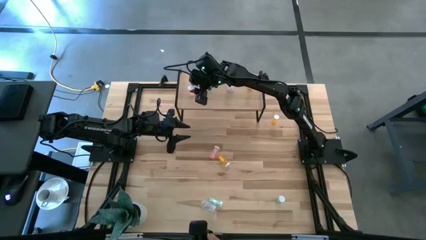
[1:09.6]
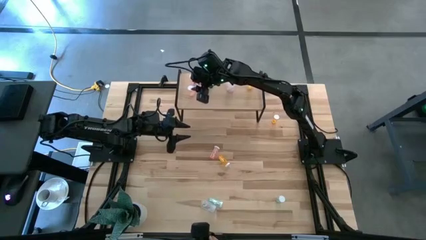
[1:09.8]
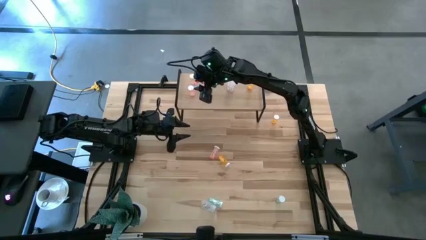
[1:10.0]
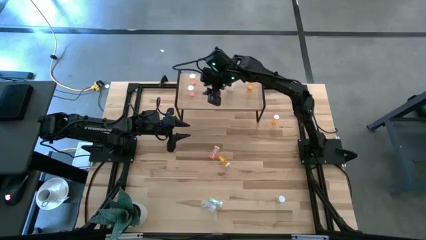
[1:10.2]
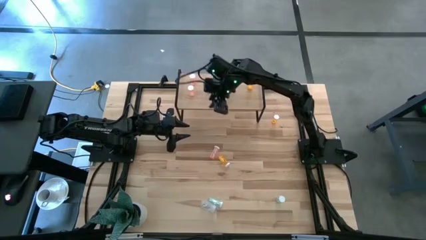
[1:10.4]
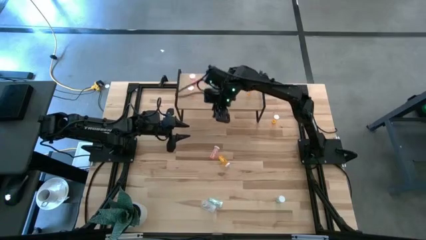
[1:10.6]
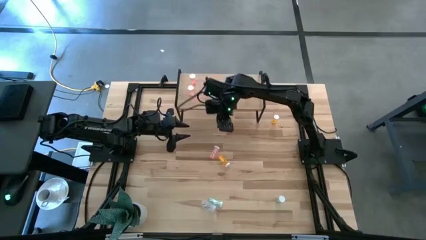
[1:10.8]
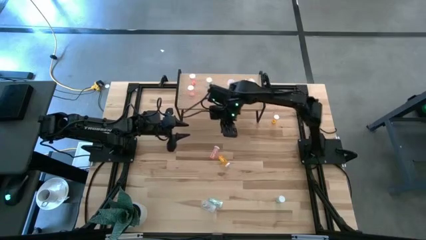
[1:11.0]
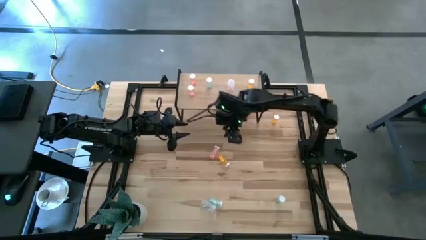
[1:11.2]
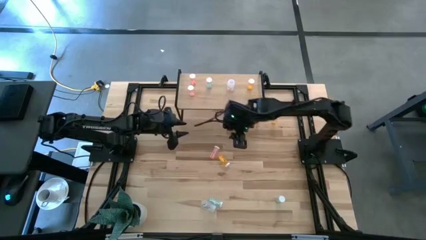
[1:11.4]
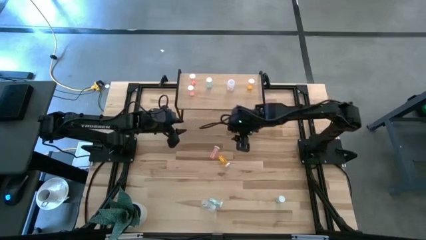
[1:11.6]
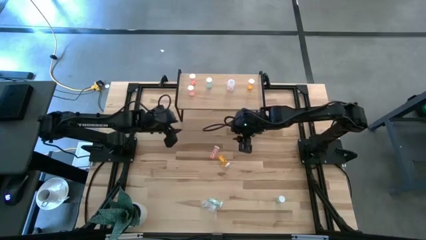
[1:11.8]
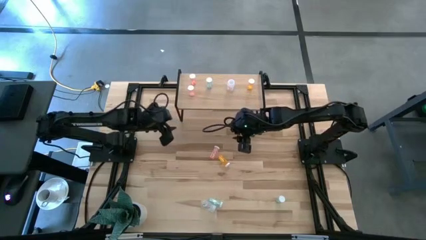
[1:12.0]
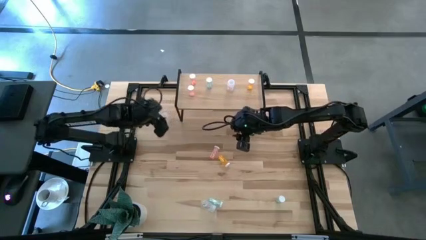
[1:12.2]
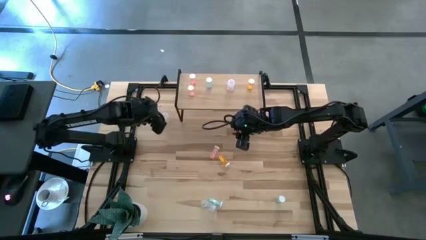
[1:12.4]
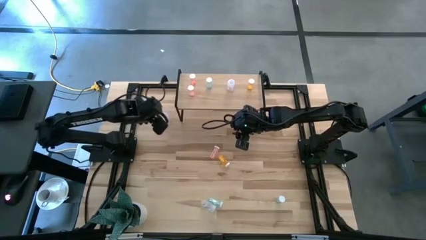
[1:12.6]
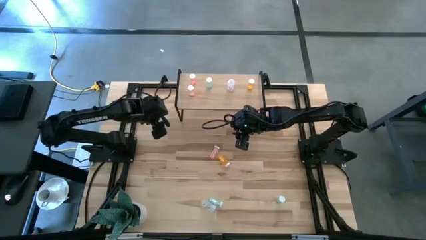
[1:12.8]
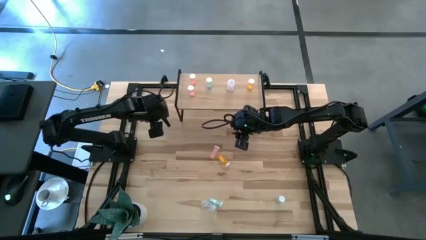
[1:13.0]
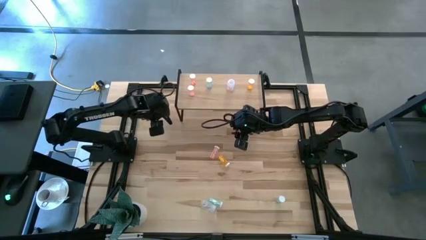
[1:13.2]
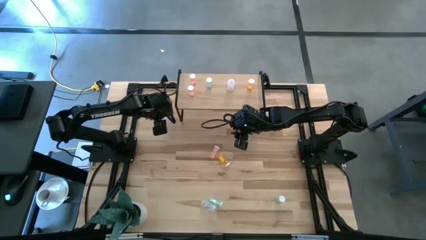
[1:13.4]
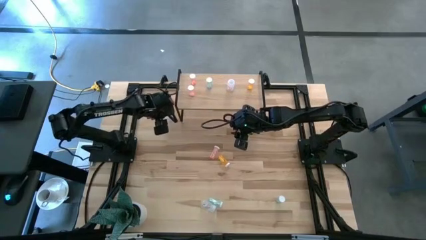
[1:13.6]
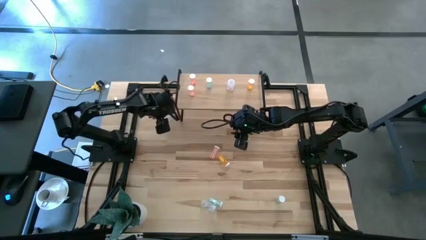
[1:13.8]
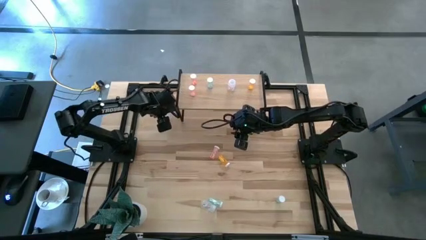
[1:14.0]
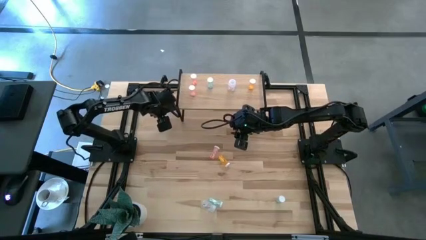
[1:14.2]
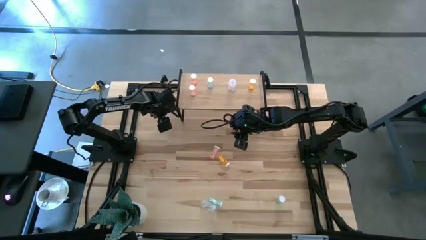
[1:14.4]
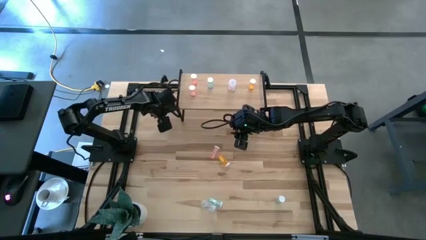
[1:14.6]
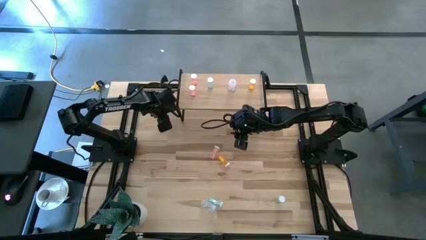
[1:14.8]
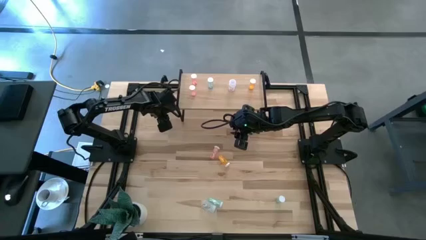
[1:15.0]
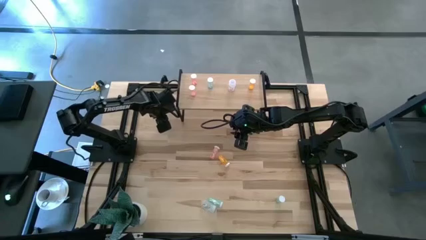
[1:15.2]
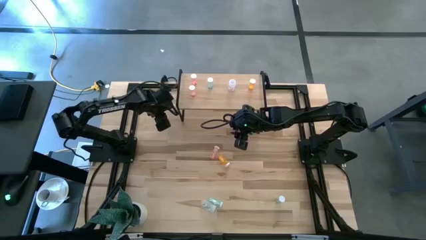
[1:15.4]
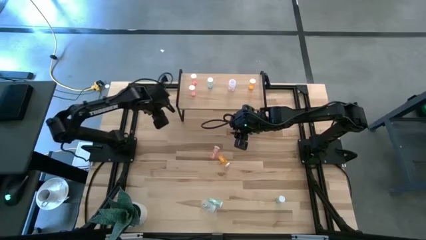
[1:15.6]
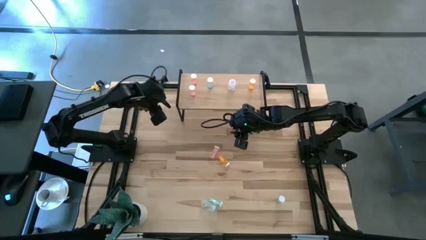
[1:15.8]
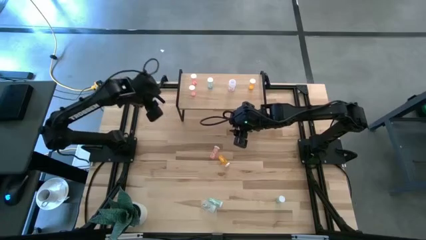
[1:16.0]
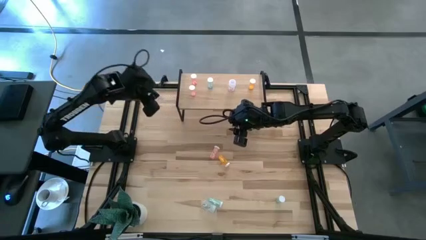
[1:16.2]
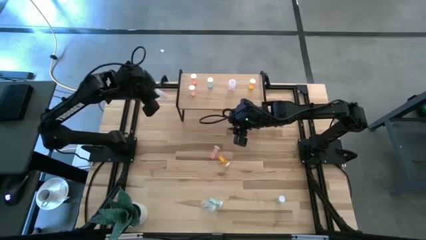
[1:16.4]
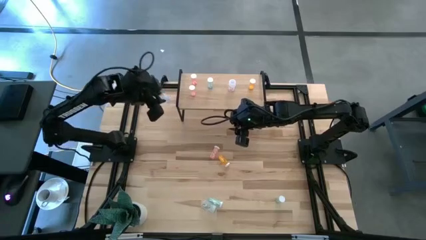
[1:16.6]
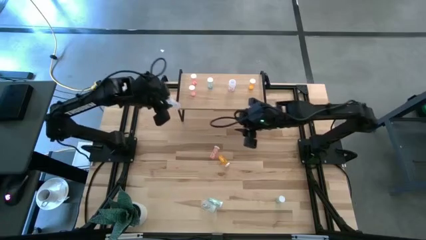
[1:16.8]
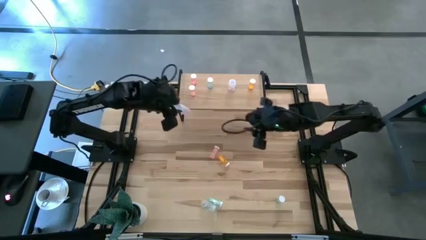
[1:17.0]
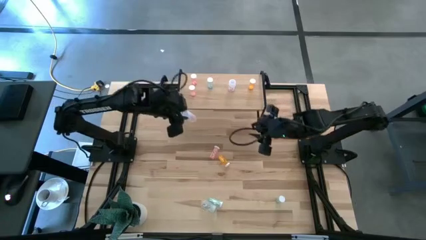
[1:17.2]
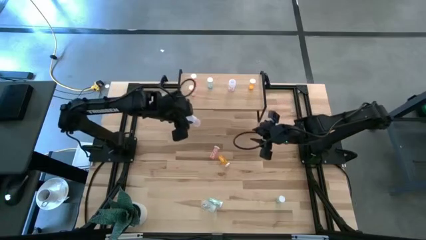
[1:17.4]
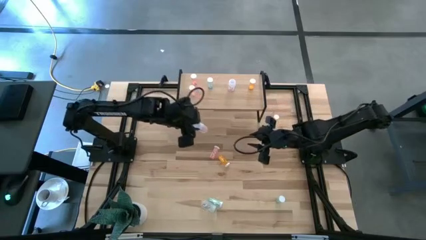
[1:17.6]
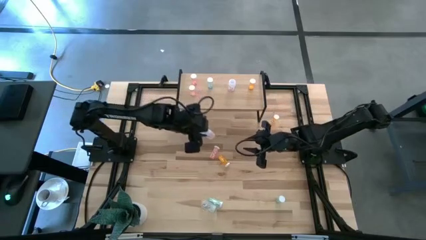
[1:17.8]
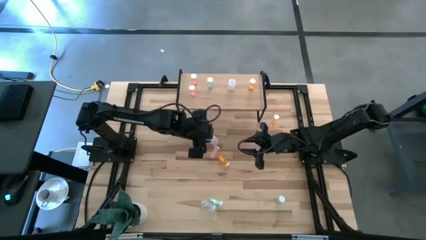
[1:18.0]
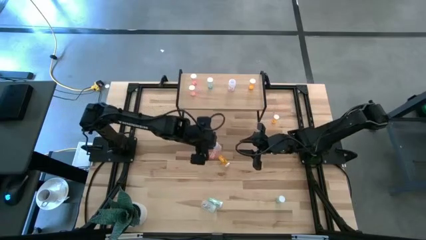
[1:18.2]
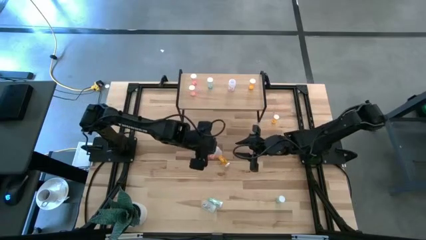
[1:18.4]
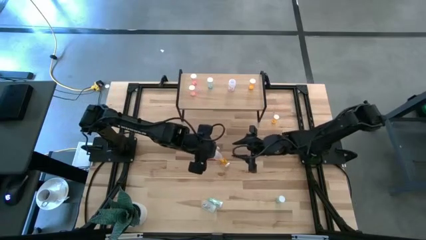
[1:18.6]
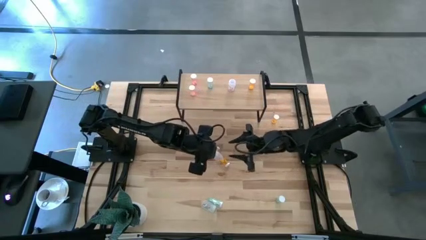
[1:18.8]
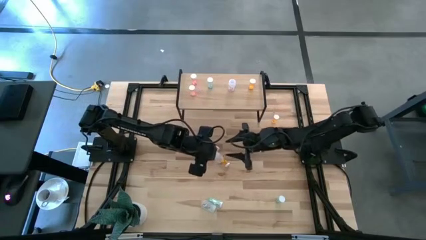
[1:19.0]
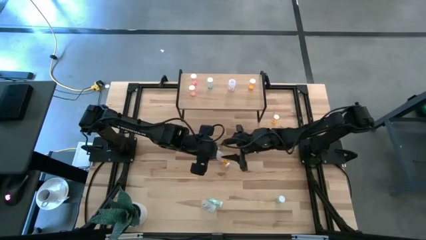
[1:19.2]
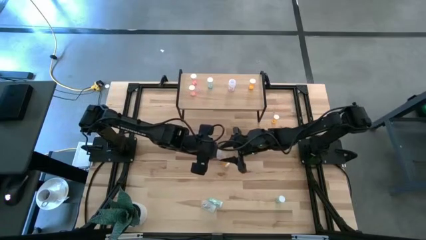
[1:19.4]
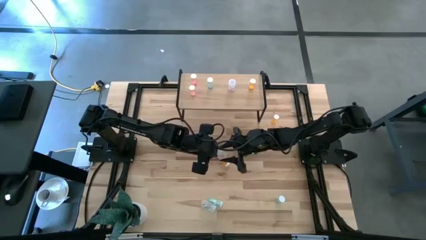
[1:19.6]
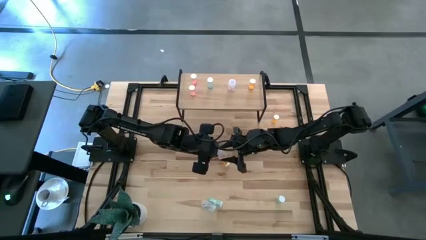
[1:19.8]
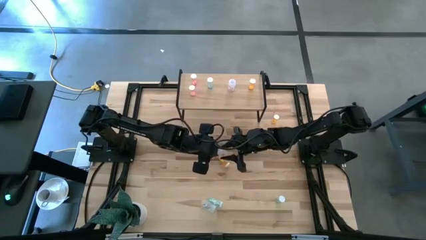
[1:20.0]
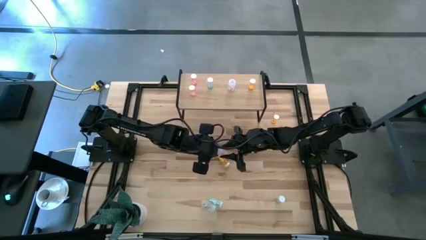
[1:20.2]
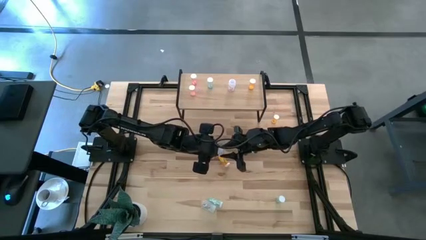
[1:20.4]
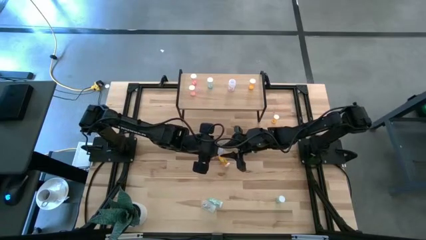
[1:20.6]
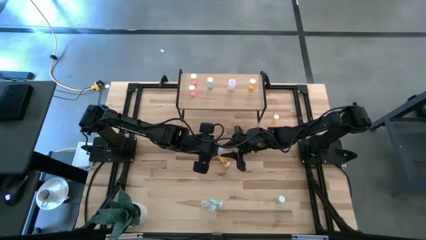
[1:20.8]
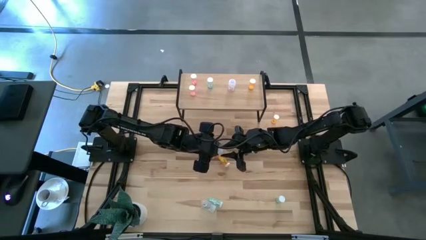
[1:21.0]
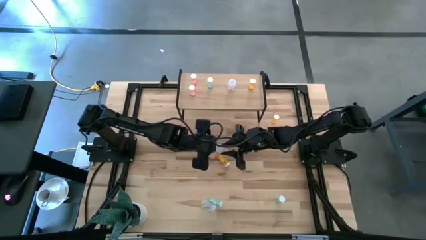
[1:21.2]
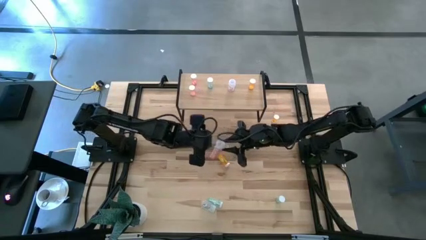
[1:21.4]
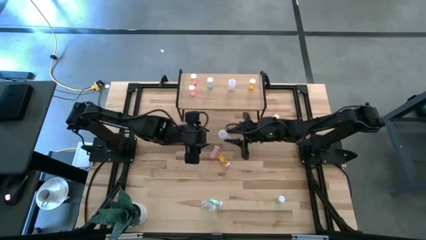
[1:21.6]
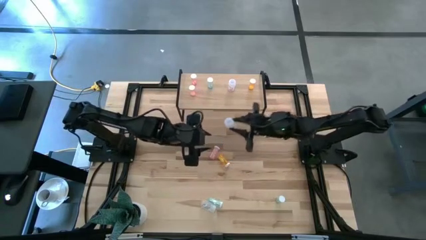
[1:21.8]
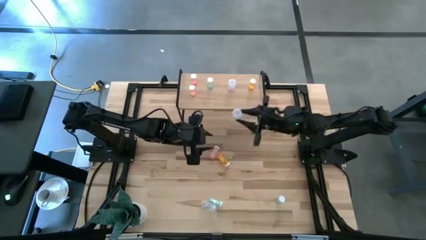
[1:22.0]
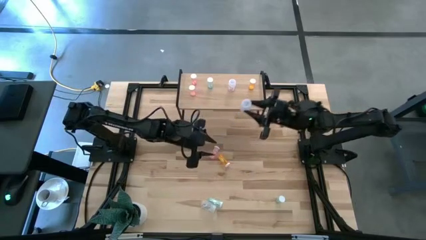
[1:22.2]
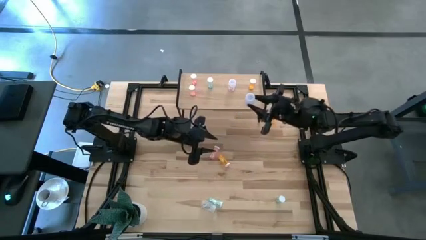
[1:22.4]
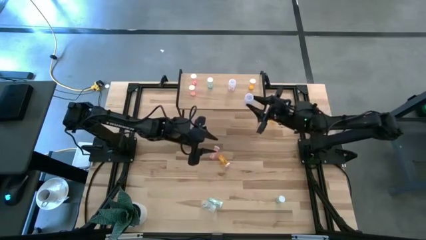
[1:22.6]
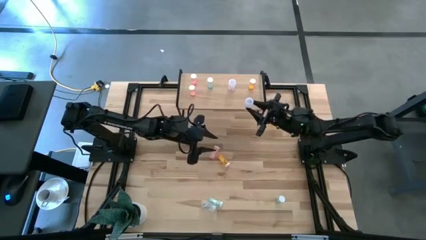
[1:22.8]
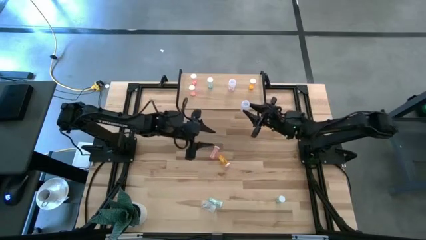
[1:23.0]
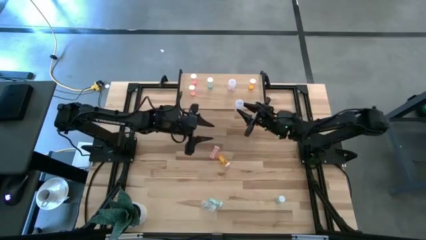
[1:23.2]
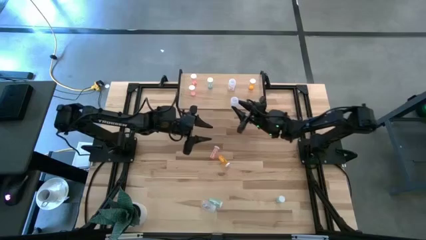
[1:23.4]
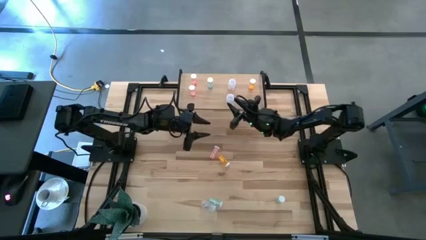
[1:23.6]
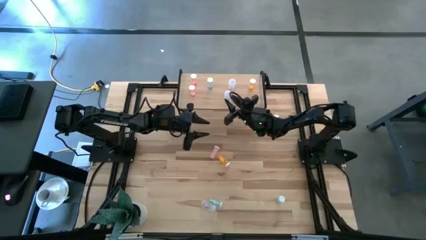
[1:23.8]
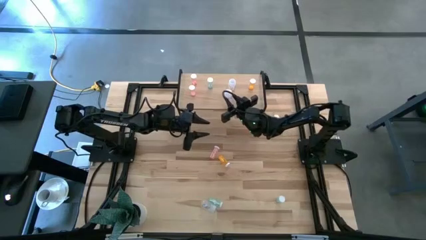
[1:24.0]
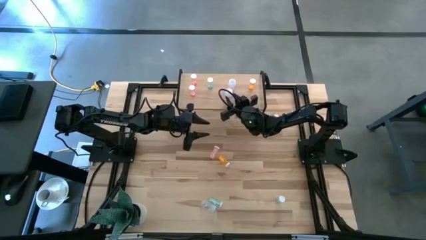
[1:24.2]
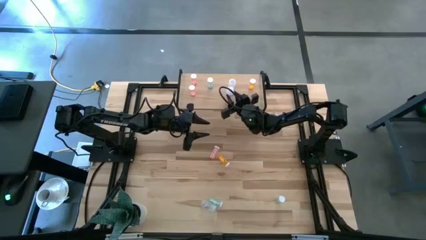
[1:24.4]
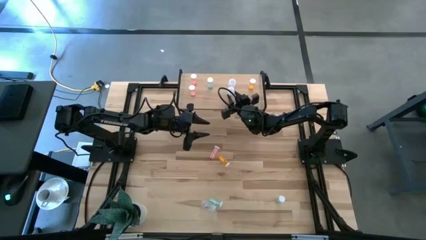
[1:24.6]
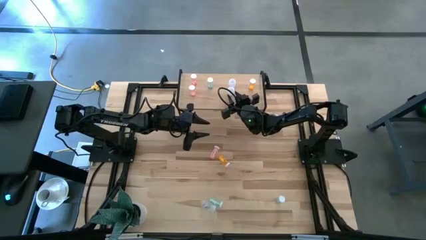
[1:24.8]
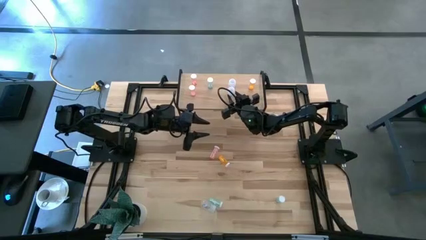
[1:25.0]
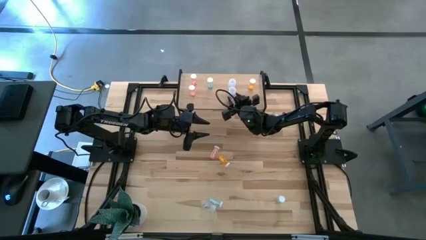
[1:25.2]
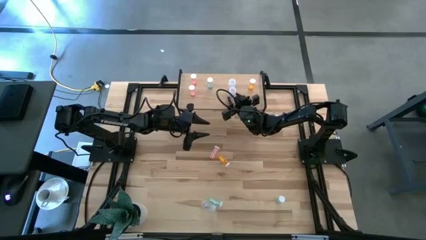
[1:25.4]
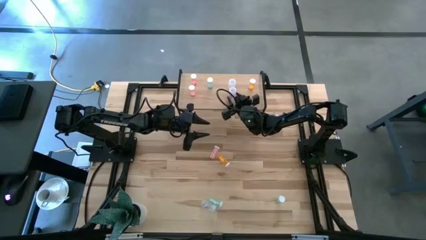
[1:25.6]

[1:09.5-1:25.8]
Task: Pick and place medicine bottles onto shelf by color
Put the top transparent pill bottle on the shelf aligned with the other transparent pill bottle
